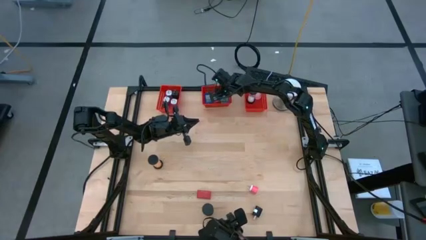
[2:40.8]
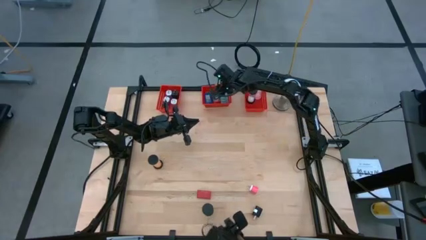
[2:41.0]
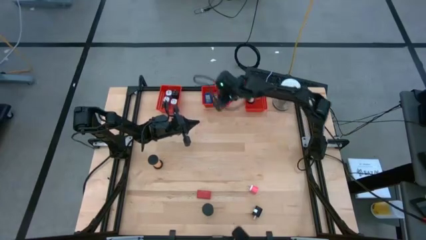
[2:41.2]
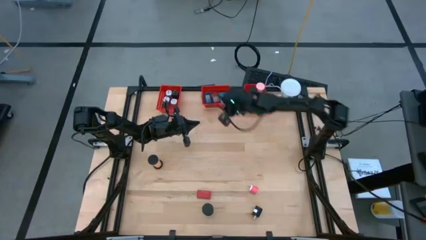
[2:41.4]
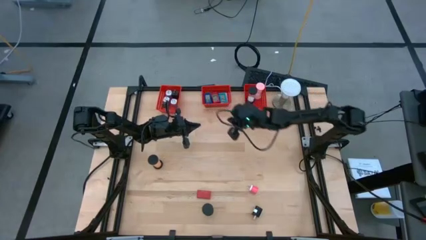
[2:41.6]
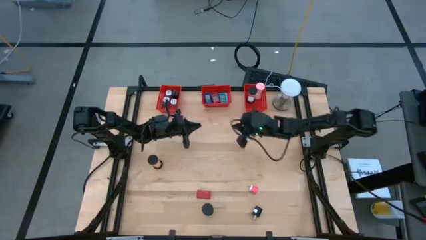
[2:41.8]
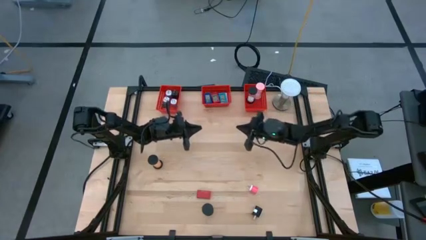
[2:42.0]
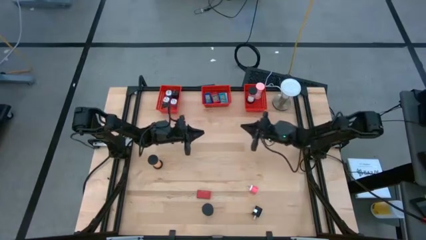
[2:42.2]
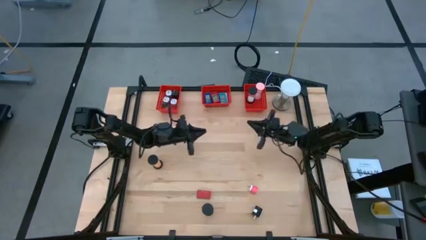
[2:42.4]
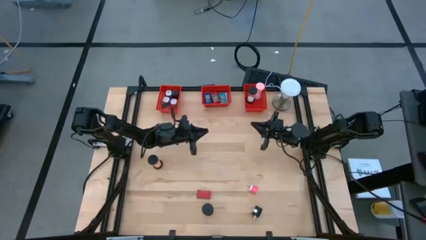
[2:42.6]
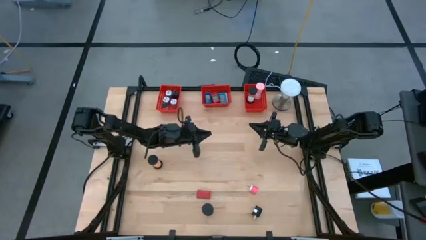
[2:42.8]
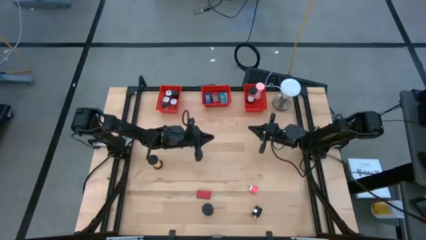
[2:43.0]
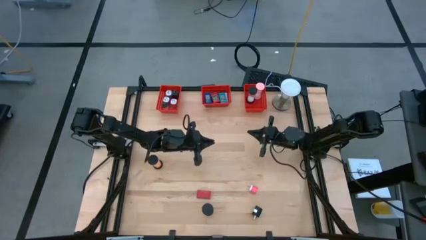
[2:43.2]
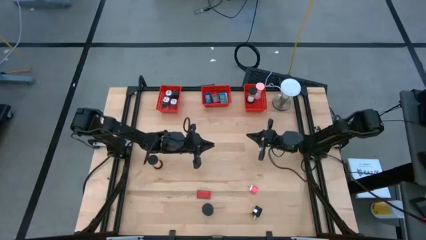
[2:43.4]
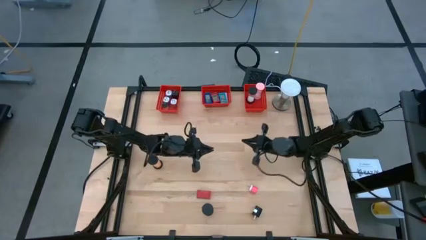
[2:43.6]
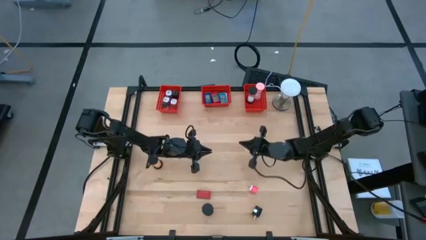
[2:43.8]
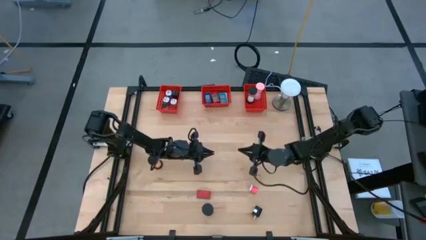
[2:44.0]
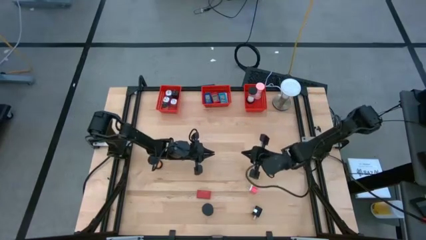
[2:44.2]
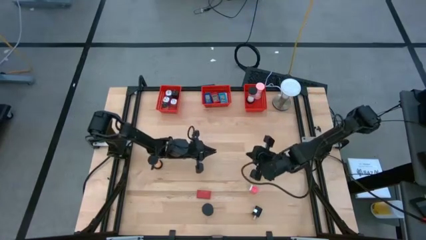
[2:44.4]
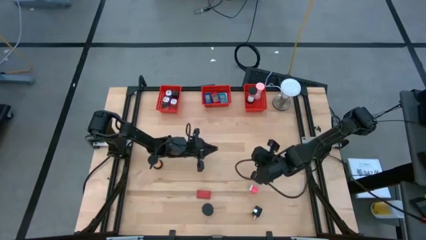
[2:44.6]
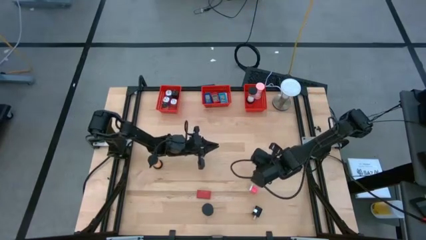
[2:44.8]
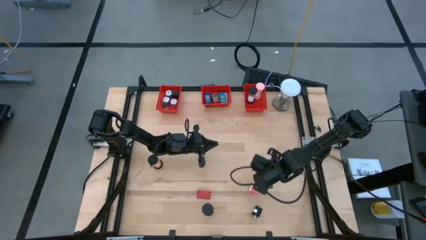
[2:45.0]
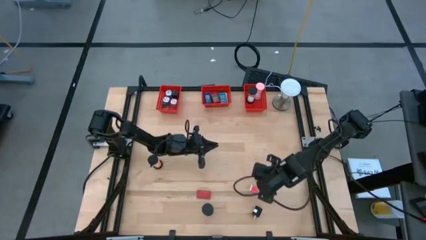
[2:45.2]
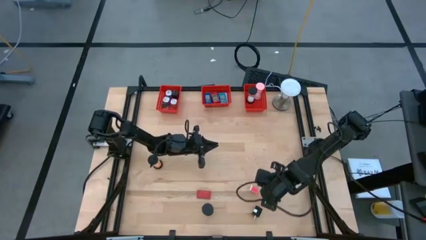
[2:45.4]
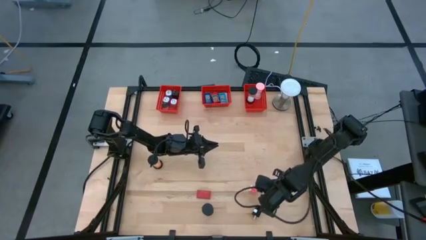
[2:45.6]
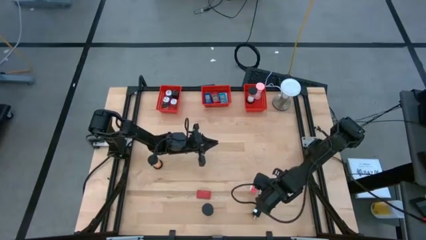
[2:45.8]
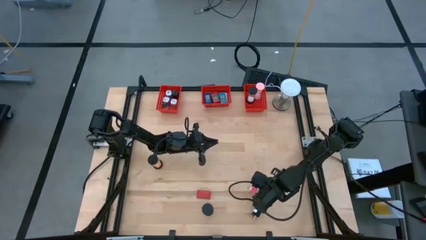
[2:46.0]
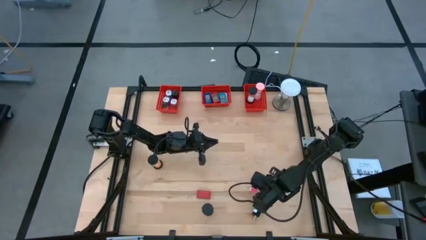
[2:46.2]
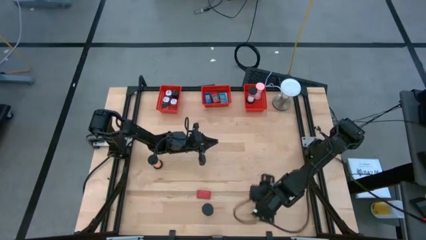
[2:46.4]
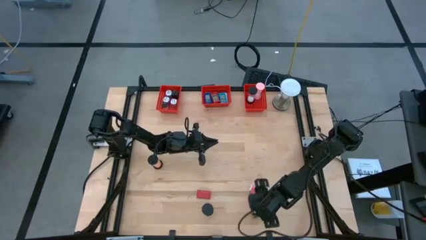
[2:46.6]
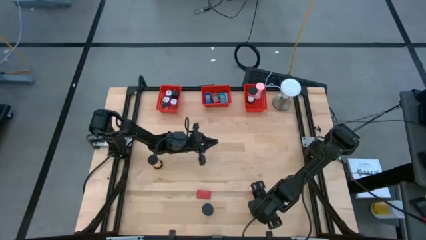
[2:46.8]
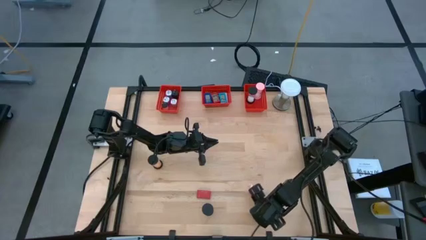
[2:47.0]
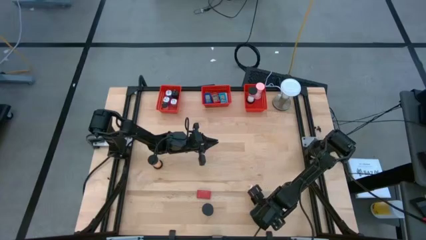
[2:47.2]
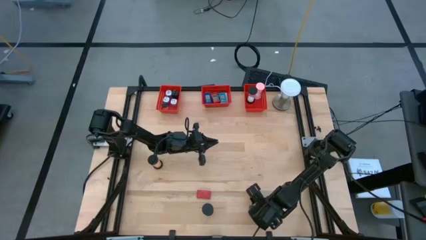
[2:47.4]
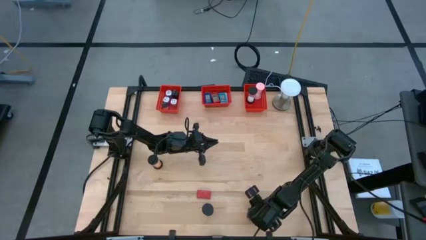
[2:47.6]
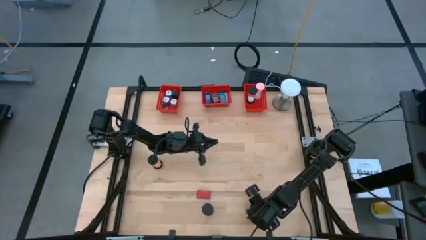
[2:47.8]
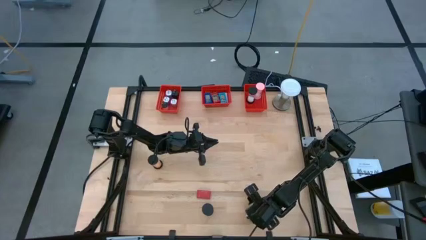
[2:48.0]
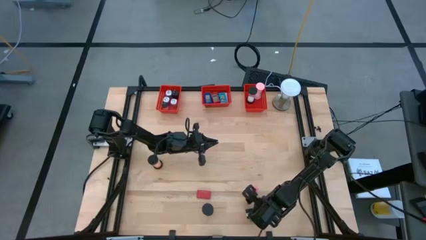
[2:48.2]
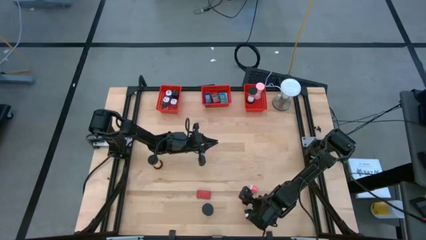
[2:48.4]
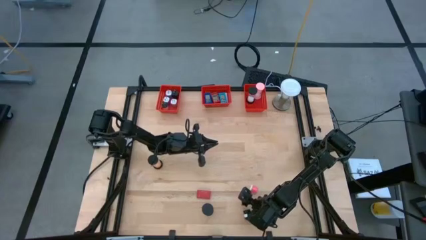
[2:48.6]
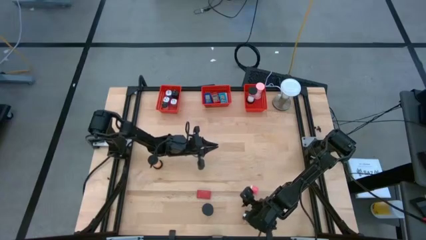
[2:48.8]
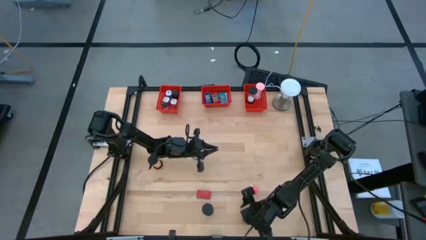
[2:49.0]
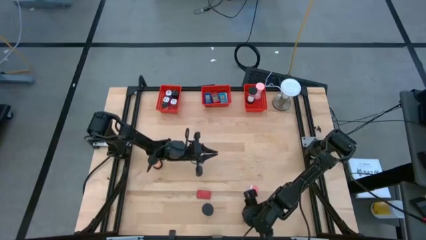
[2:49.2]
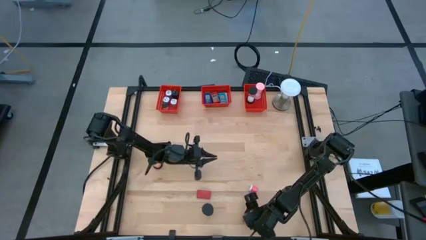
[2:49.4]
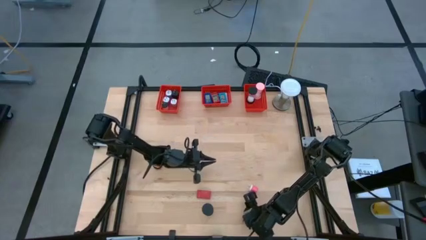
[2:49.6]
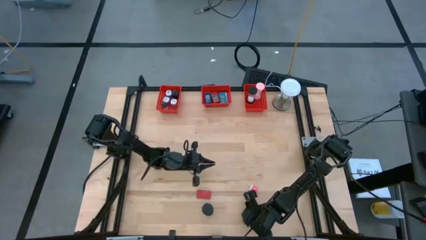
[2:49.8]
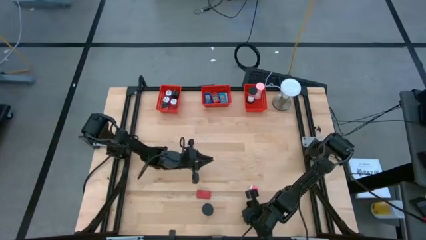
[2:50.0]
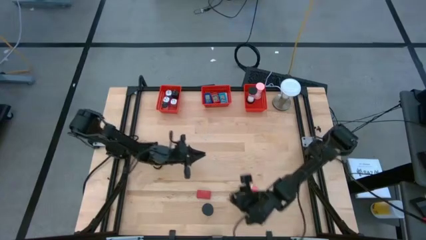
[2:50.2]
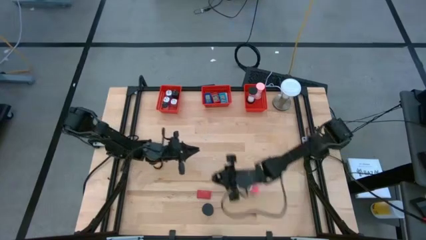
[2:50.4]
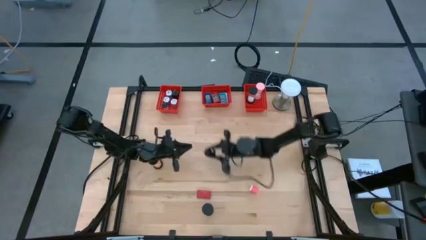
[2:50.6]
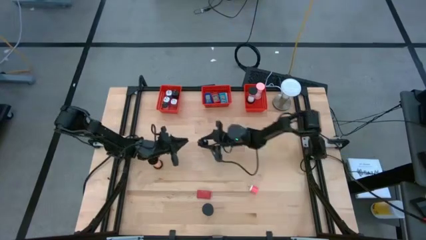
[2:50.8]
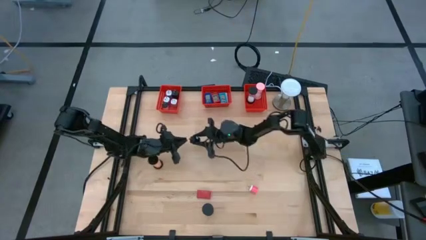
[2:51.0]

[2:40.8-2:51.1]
Task: Pick & Place Office items
Put the black charger adapter into the left red bin
